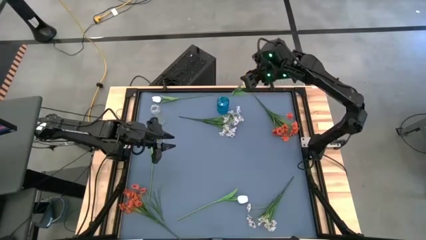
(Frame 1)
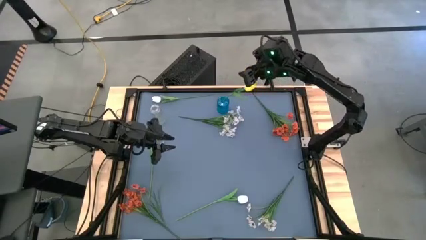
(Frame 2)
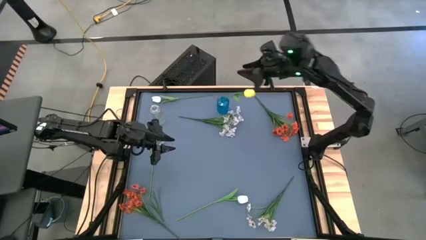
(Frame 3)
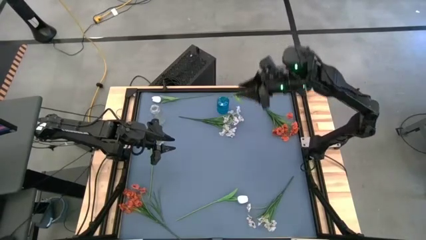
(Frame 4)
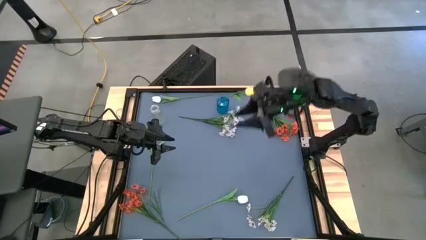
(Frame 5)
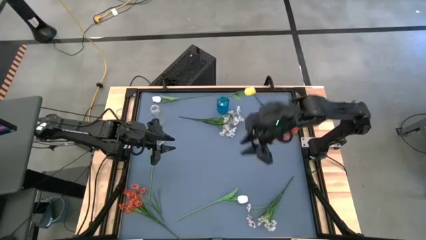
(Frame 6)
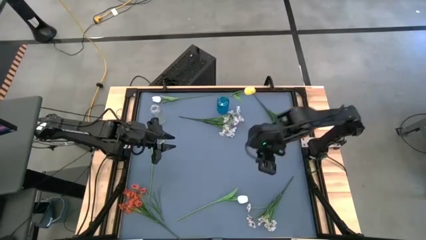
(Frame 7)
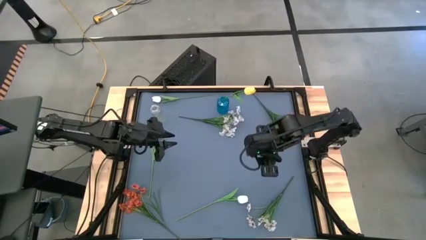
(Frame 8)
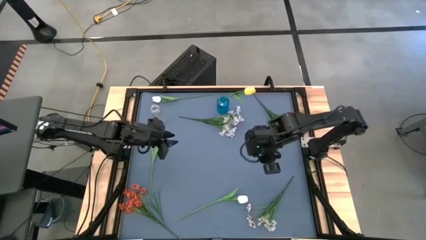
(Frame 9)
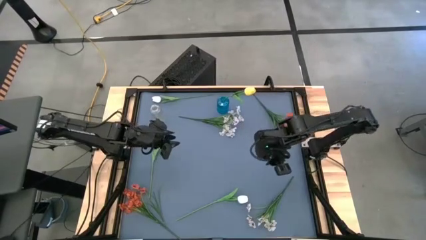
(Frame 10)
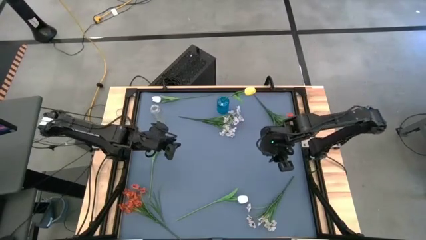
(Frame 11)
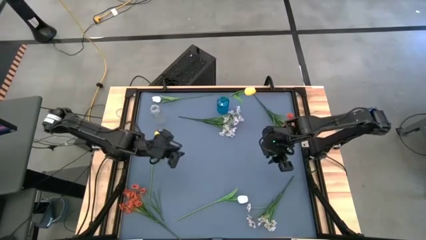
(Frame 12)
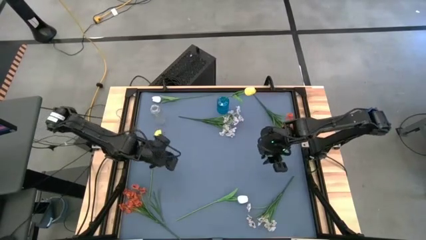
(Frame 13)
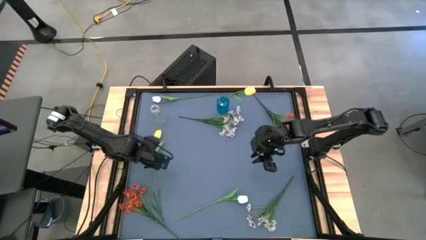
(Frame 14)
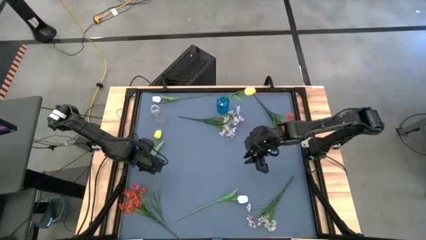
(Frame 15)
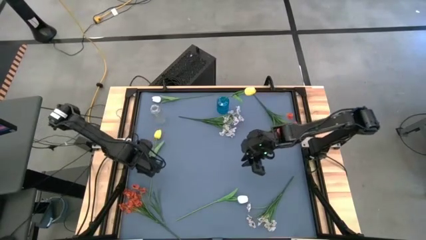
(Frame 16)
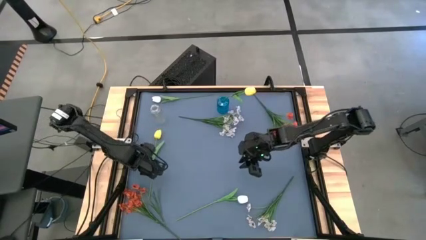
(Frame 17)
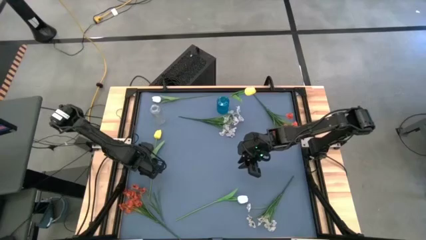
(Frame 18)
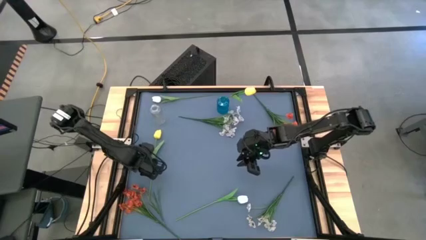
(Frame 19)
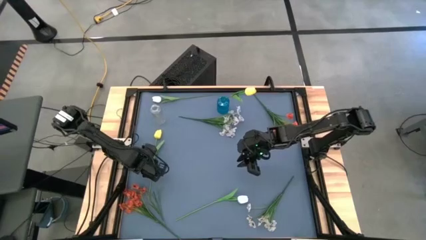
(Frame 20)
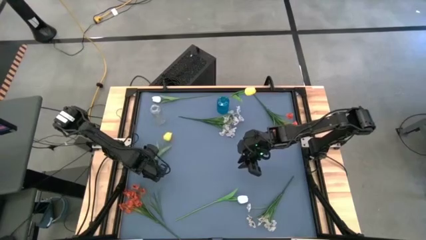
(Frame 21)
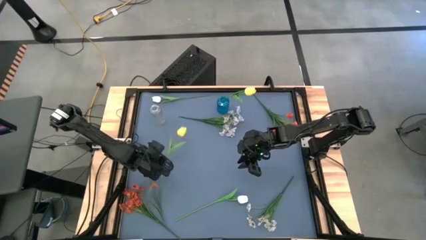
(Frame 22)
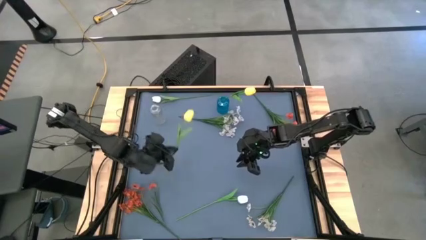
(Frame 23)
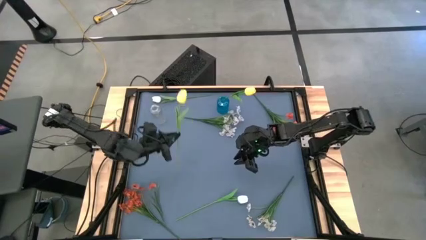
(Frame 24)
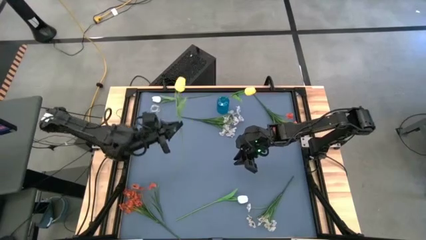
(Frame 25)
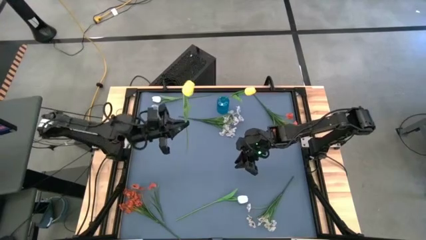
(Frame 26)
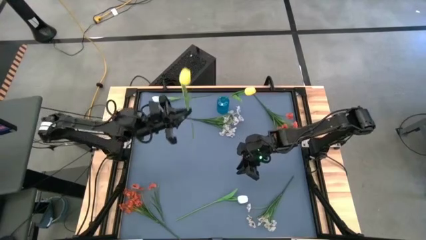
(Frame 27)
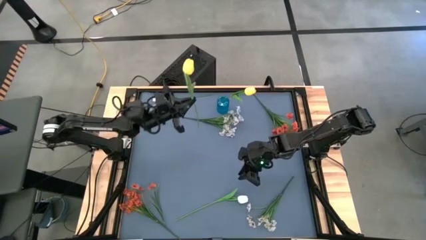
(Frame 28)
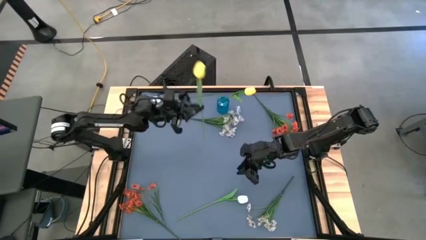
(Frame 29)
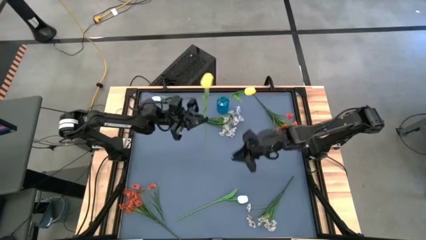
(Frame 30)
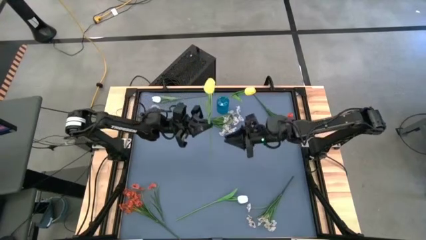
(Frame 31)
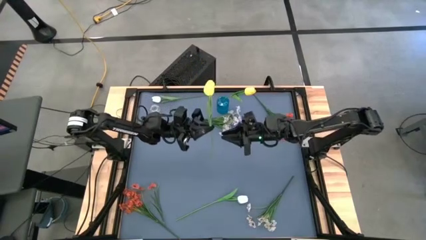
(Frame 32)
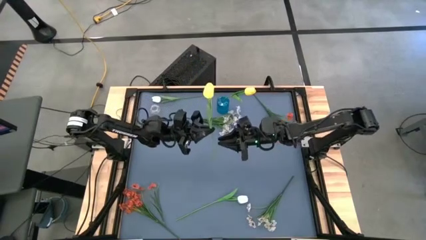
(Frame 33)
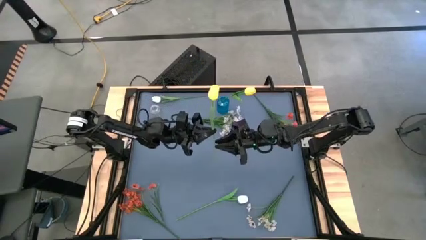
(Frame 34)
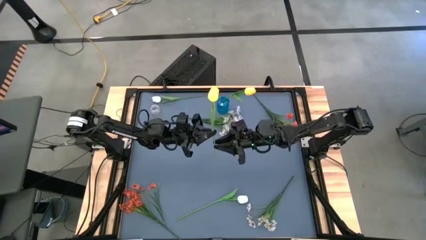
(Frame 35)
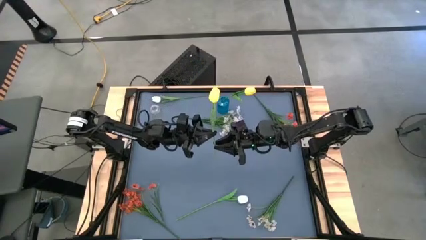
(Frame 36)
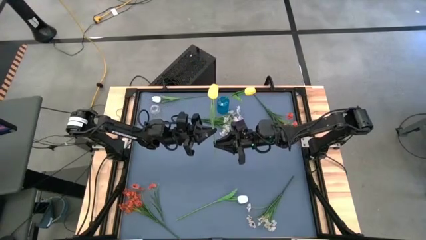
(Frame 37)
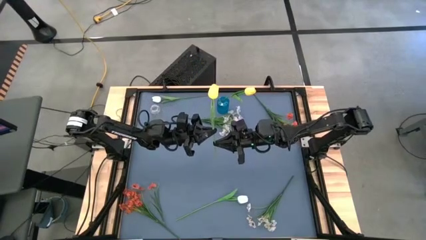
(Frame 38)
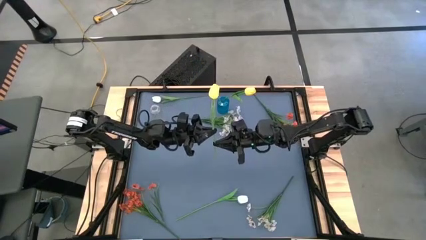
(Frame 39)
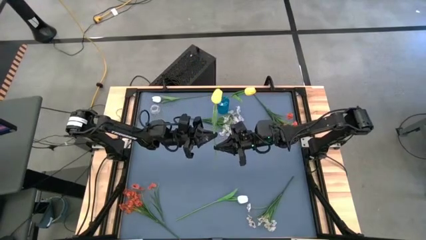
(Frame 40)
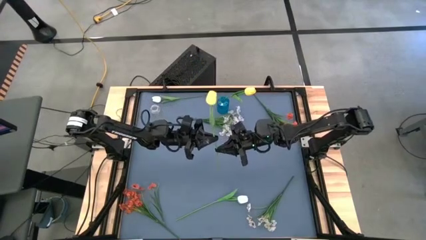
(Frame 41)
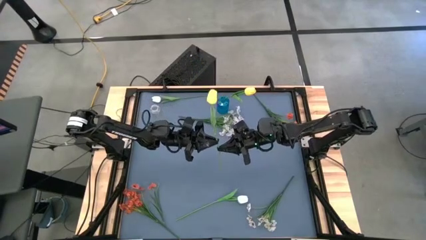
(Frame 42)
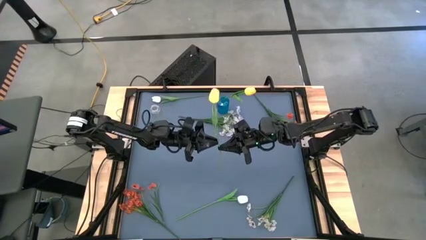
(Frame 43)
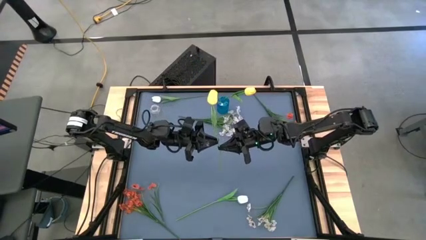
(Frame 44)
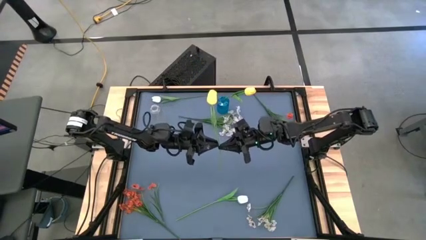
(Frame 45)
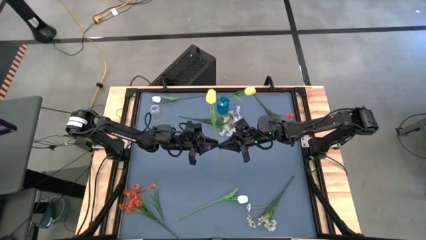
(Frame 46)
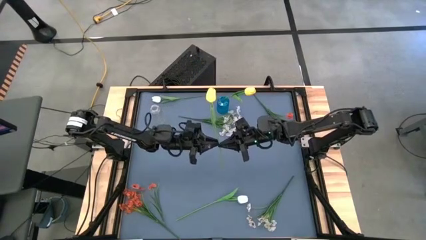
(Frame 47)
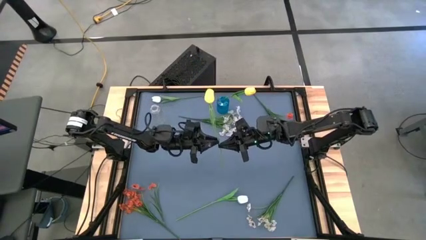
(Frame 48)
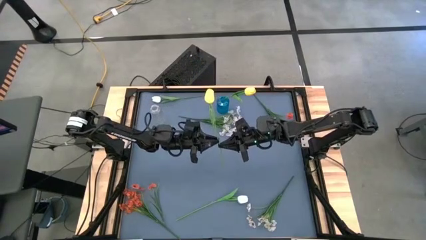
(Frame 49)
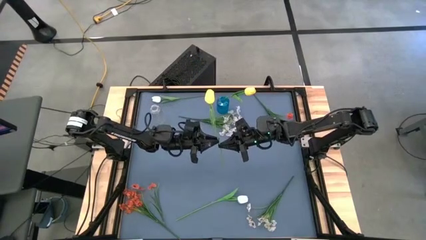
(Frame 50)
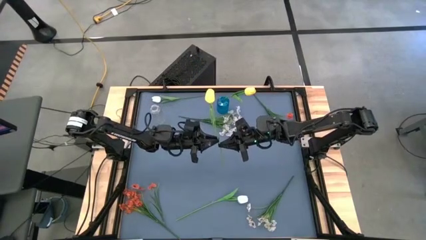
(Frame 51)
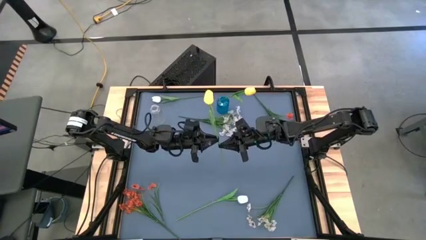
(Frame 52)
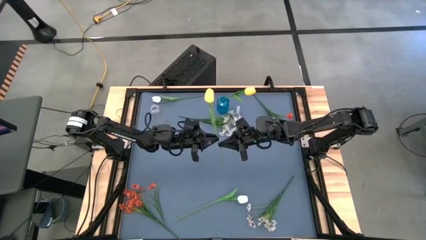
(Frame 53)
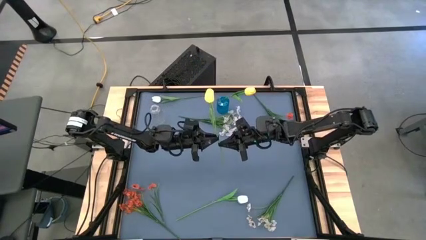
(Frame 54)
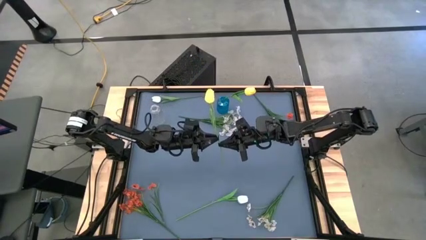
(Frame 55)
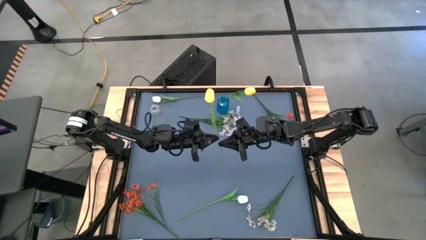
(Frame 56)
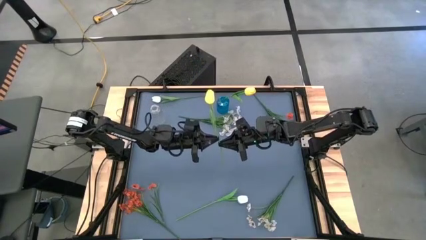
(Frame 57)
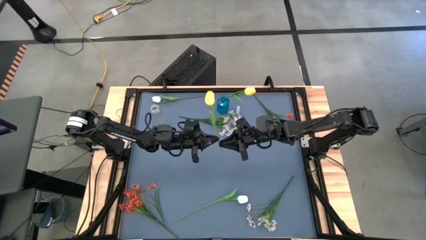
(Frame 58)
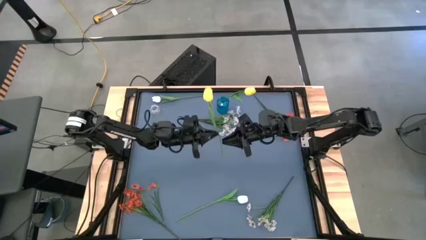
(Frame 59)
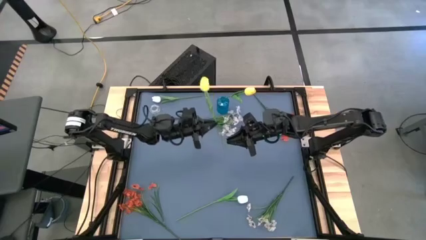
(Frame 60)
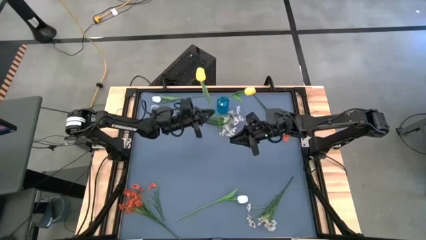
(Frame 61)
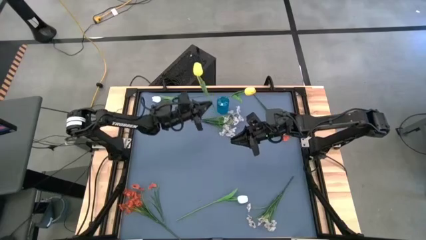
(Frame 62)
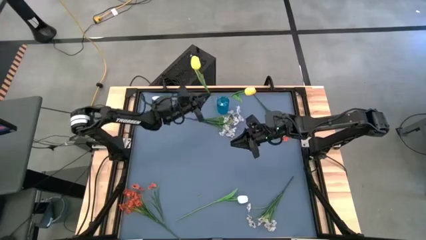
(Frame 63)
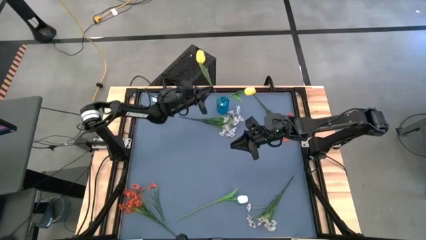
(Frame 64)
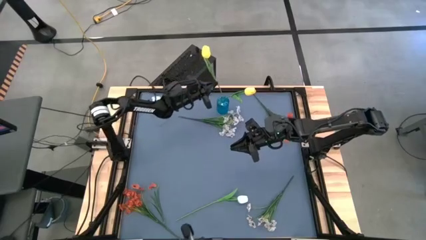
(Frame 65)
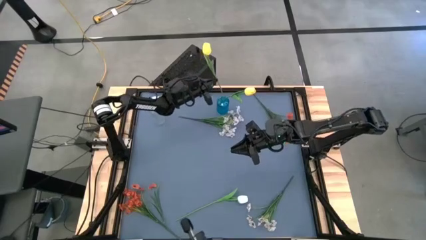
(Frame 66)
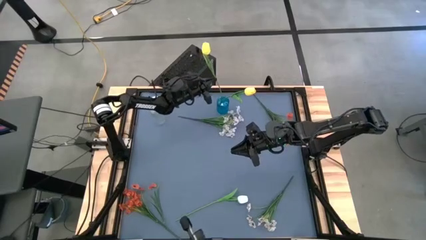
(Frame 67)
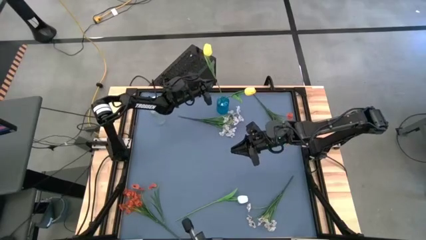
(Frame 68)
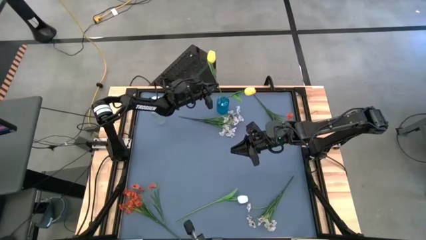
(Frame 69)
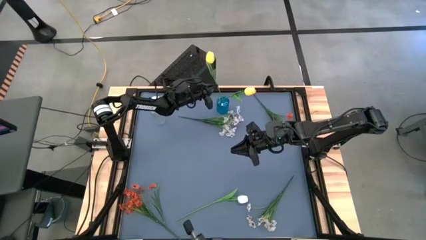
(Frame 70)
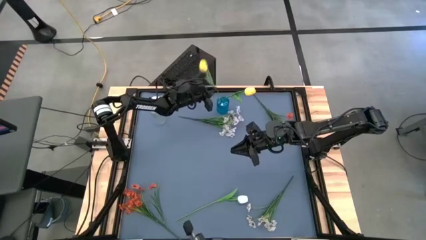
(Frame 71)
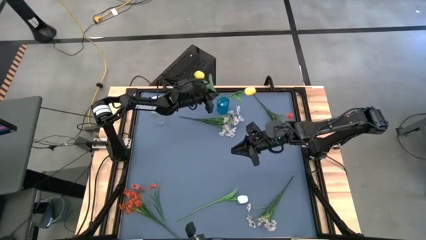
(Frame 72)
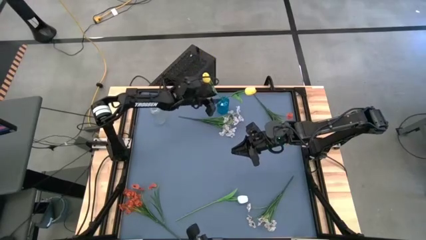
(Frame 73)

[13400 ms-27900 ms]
Task: Sort flowers into vase by color
Put the yellow tulip into the blue vase

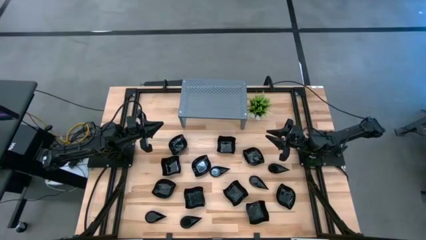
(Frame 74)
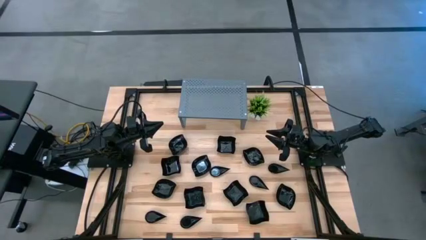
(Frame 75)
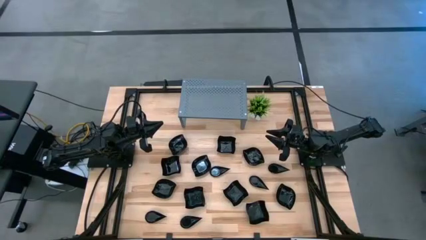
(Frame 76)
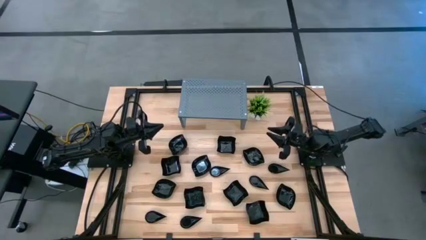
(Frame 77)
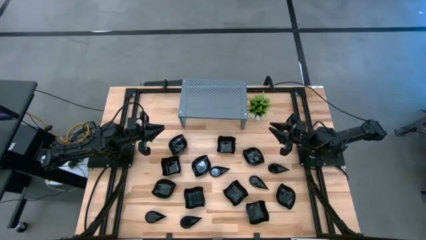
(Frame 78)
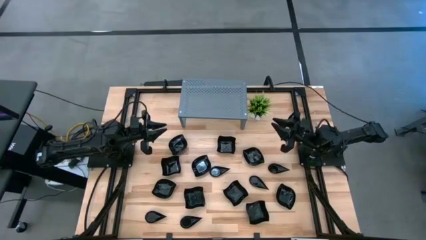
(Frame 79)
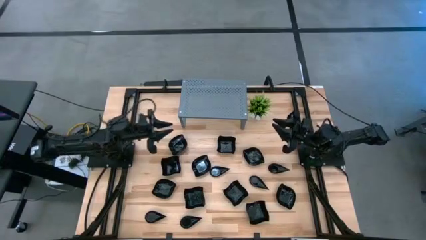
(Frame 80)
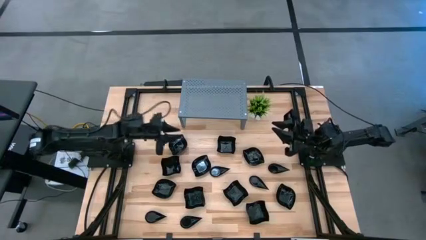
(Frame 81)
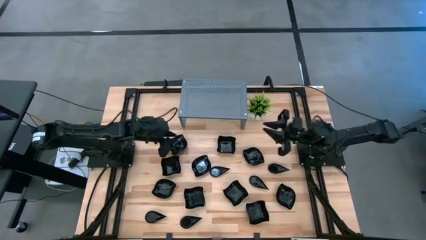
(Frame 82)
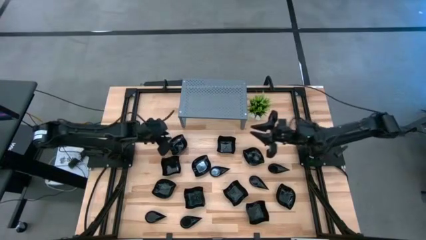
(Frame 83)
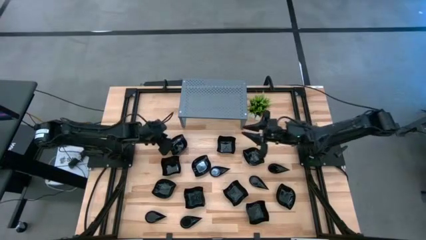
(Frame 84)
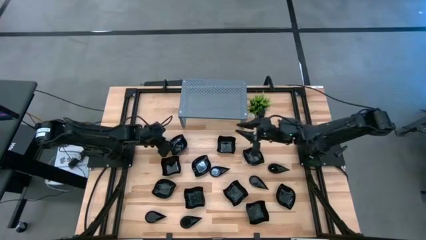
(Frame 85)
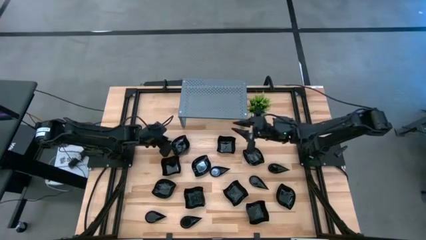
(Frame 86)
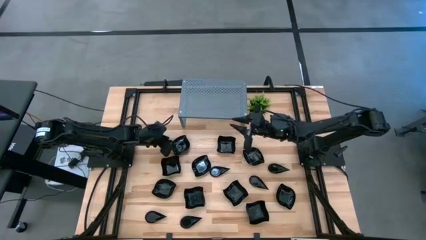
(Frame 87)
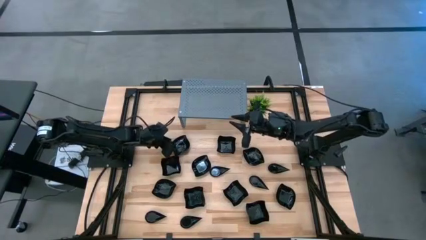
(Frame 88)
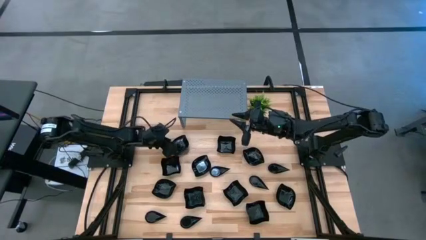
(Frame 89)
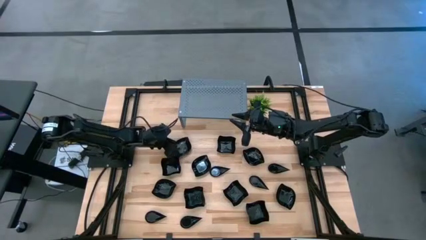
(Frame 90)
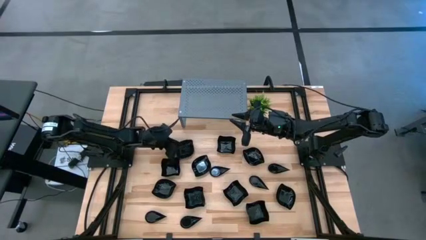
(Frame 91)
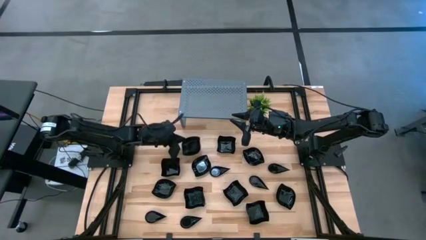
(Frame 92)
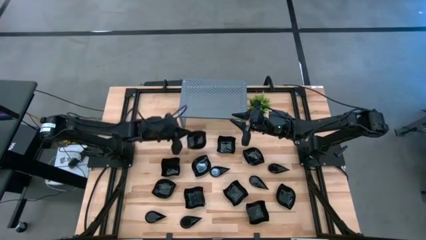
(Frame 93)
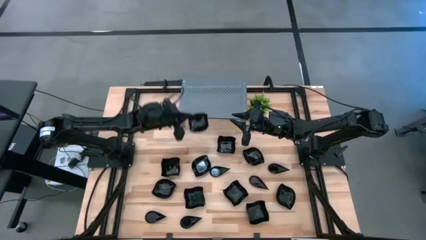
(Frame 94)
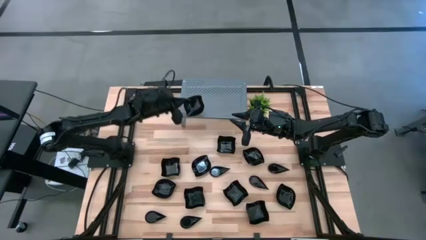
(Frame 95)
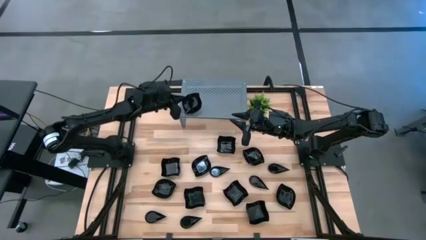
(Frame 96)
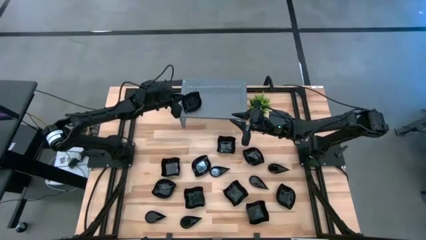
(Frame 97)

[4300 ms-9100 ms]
Task: Pick & Place Mini shaped plates
Put the black leaf-shaped plate on the shelf
